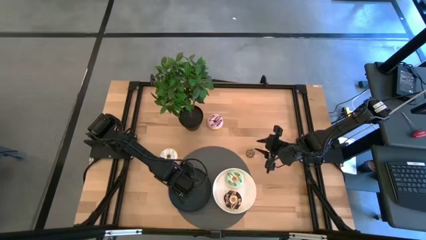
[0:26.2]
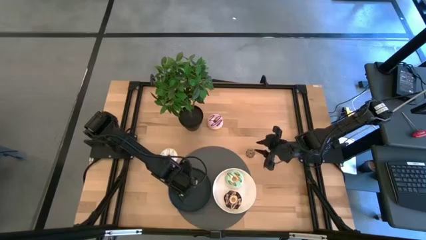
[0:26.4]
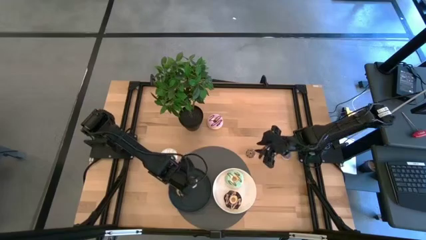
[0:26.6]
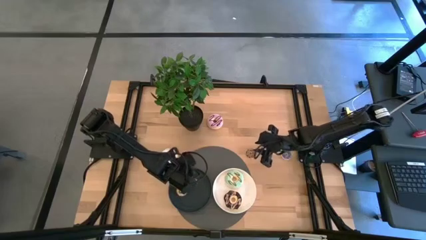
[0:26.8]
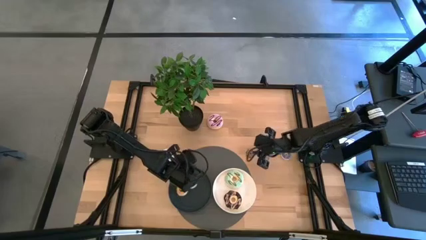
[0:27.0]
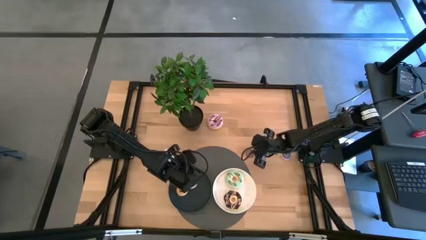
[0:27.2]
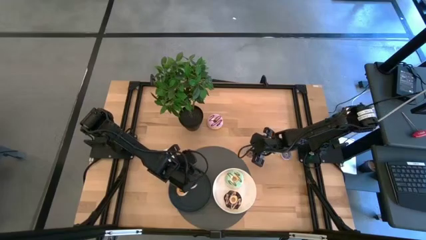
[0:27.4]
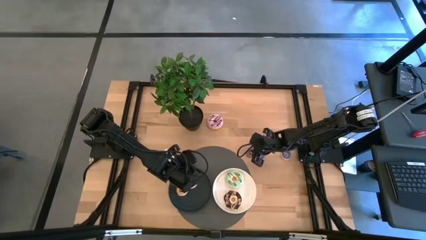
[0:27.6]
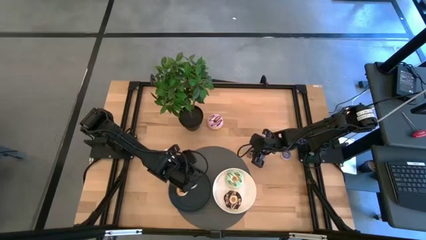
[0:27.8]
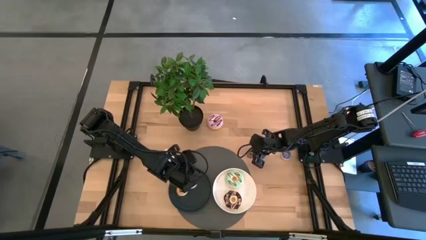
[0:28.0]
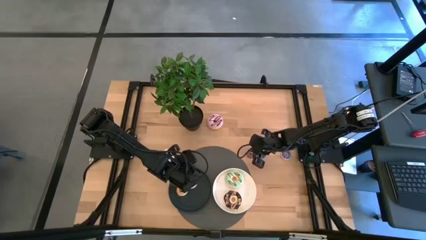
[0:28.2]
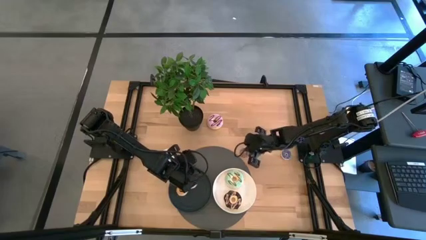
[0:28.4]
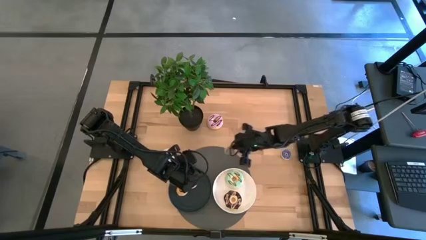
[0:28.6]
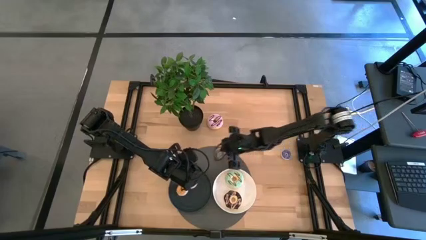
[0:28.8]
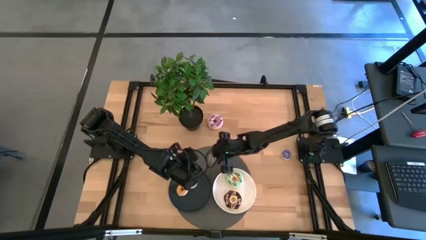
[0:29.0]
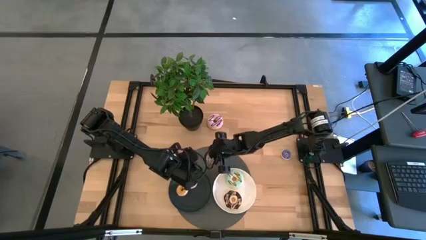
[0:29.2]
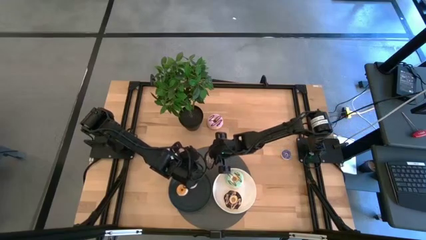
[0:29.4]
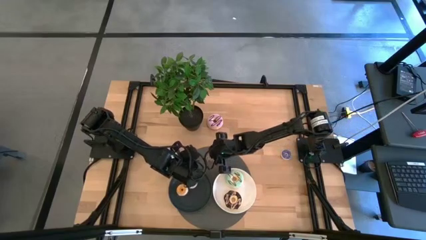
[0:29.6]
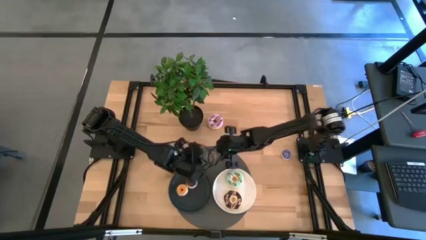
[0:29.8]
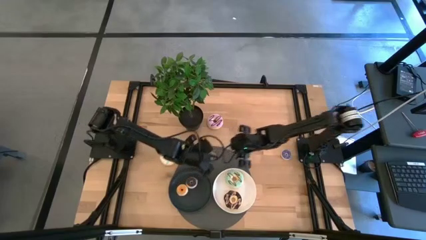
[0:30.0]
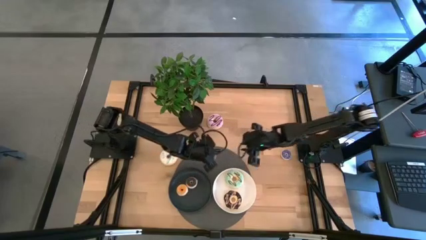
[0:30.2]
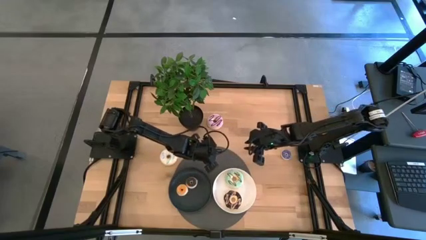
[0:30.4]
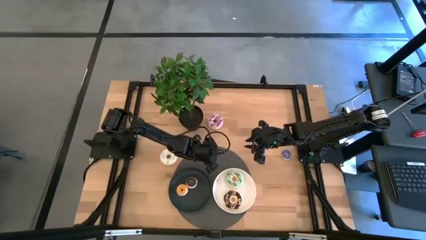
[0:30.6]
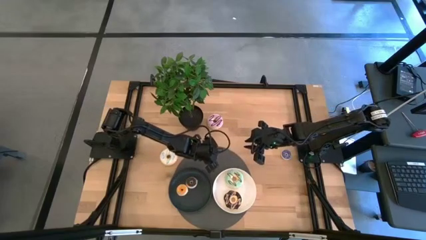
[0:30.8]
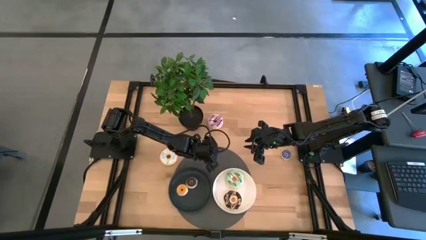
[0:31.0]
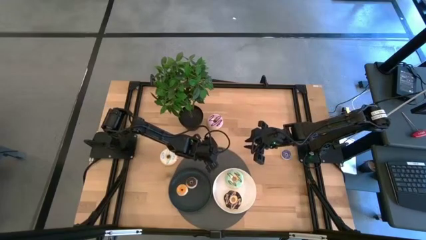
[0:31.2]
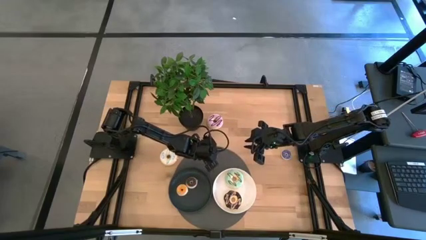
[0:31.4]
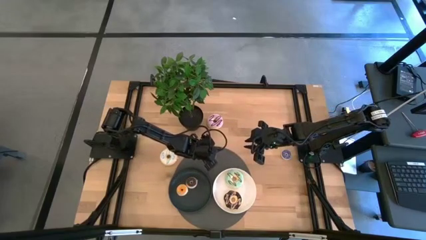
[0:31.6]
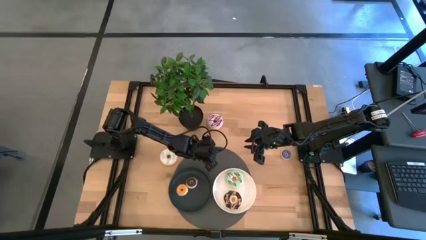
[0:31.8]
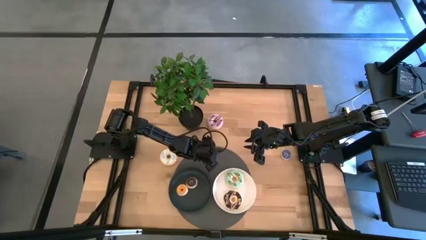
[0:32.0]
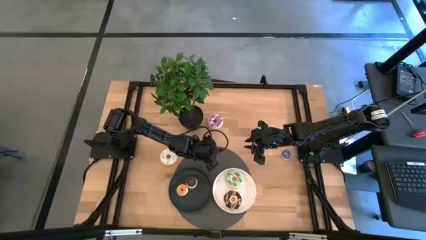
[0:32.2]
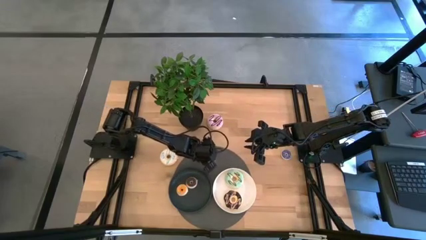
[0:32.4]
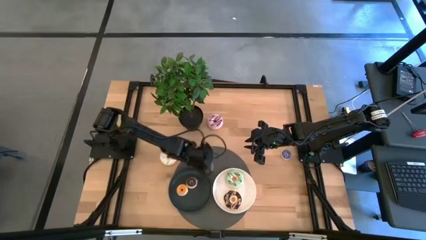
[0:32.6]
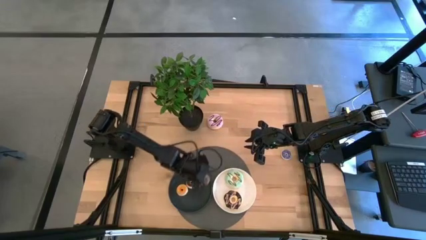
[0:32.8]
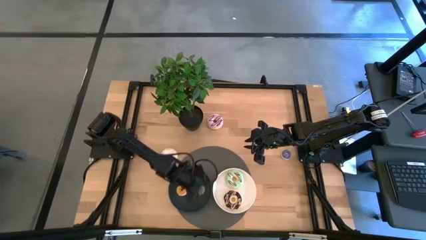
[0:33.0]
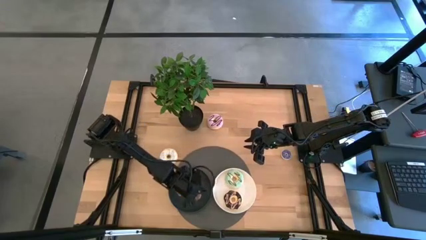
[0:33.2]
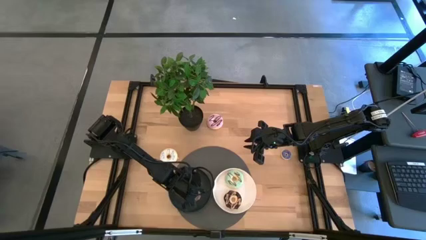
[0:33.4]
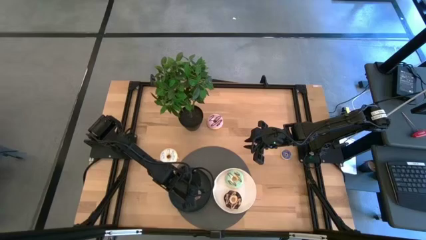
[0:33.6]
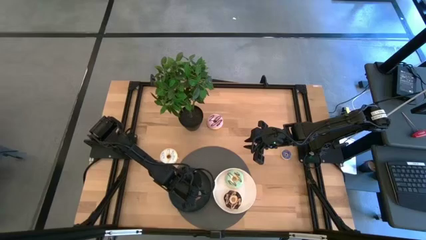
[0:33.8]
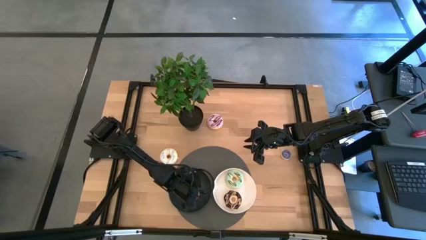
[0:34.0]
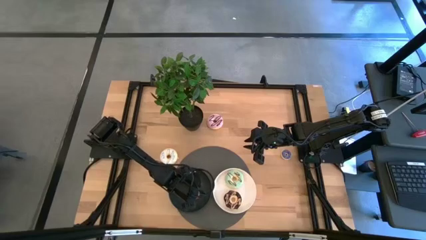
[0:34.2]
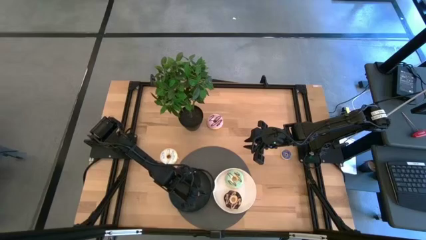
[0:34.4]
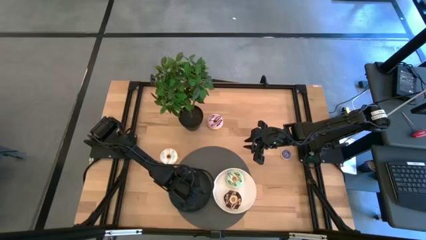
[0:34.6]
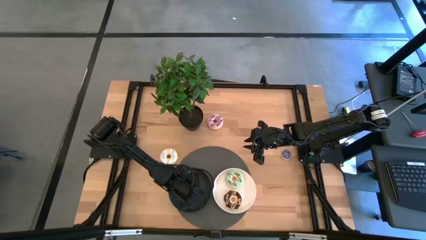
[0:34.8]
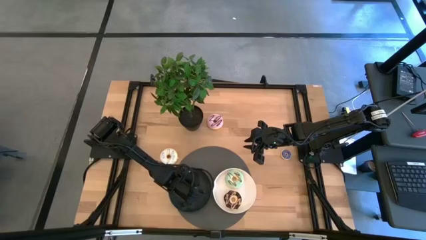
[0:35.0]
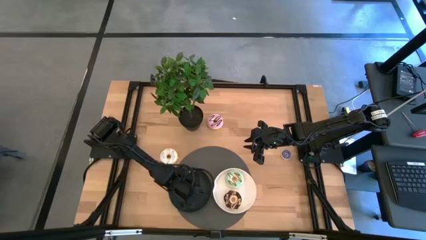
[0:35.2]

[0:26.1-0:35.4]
Task: Pick & Place donuts
Put the small brown sprinkled donut into the black plate

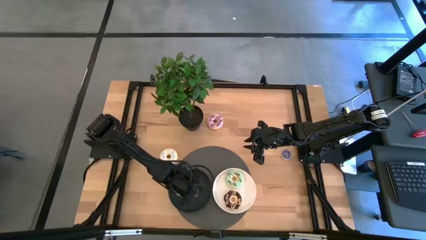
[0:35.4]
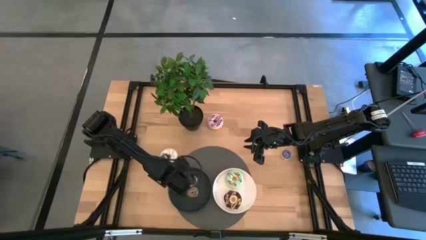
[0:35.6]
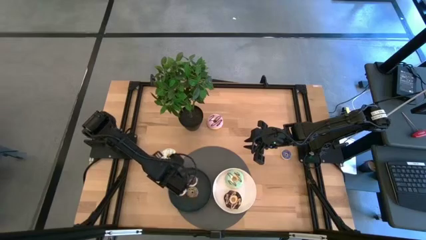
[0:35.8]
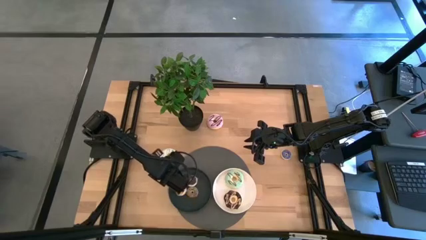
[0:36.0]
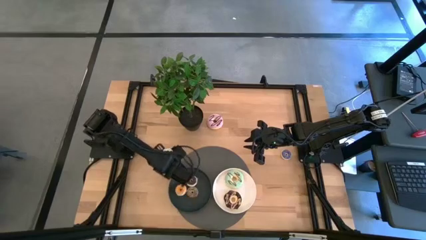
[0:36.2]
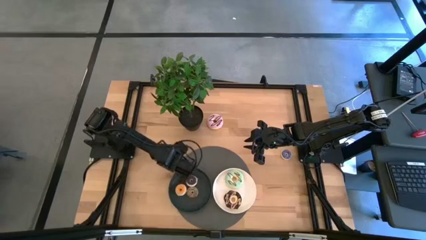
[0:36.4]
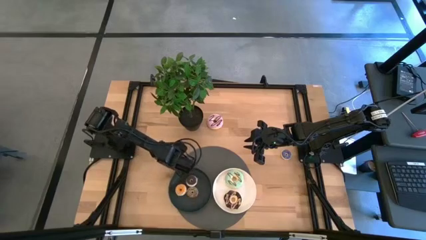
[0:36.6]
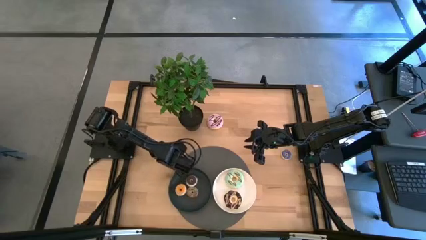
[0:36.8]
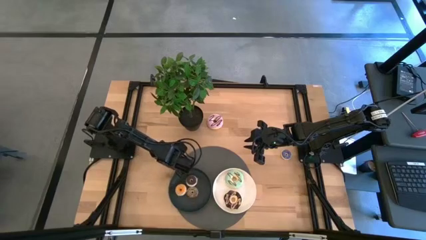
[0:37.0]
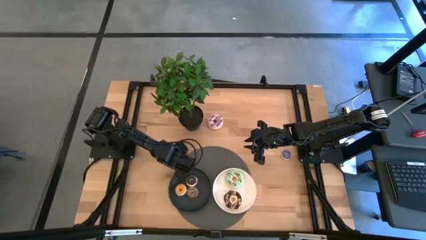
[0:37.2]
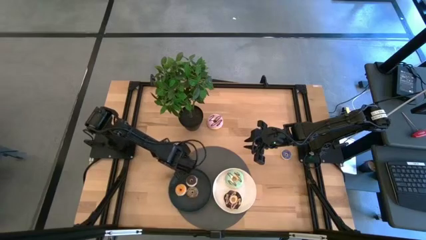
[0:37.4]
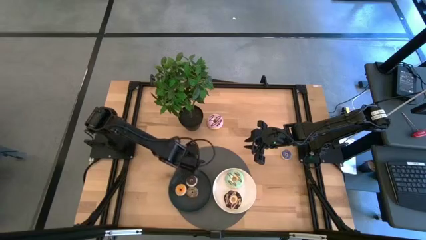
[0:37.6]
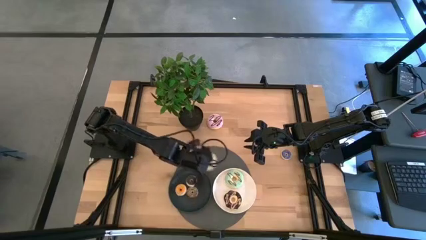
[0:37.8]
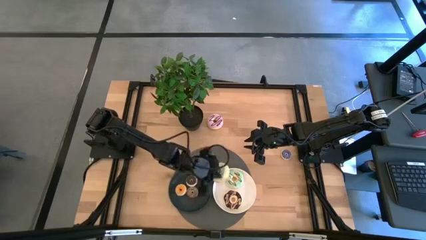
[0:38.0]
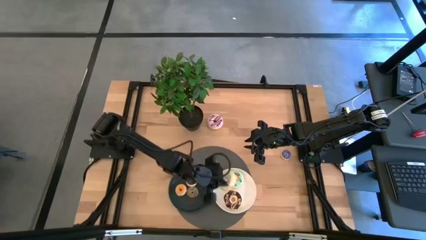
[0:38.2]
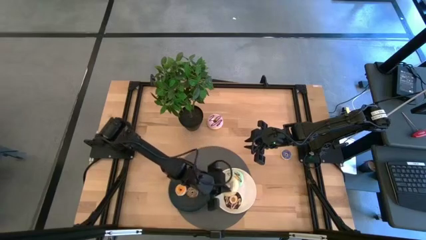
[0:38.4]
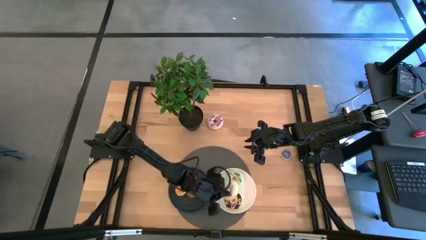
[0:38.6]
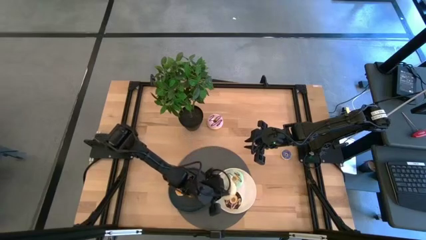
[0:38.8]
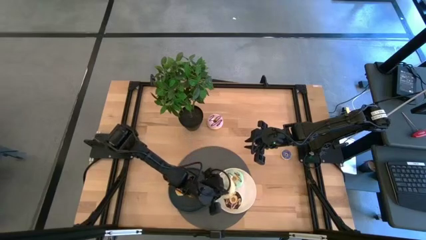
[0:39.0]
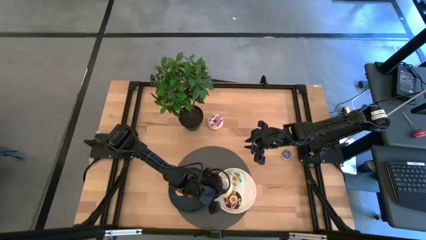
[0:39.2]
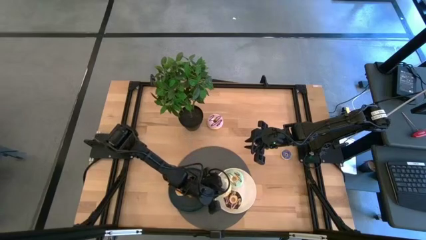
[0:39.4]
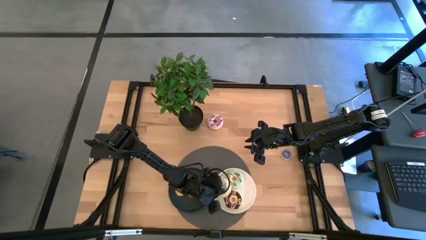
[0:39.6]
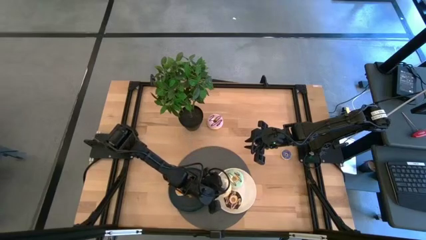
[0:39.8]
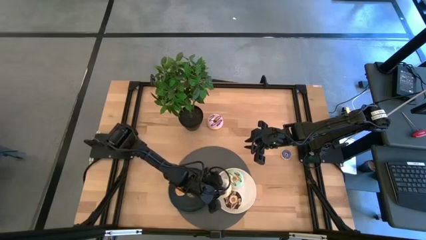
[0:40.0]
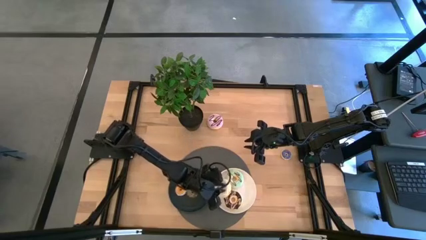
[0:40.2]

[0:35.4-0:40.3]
Put the big white donut into the white plate

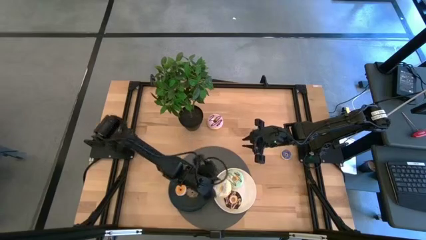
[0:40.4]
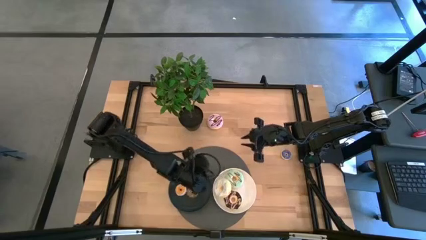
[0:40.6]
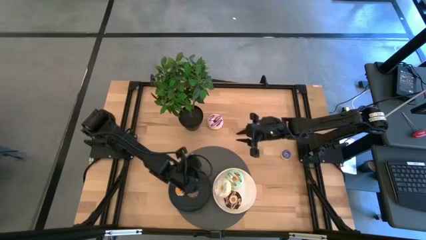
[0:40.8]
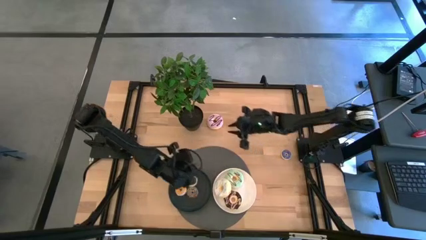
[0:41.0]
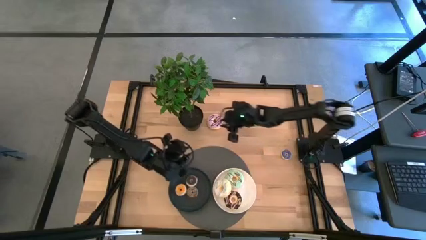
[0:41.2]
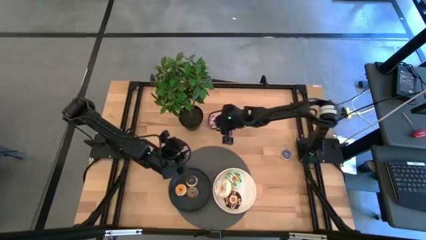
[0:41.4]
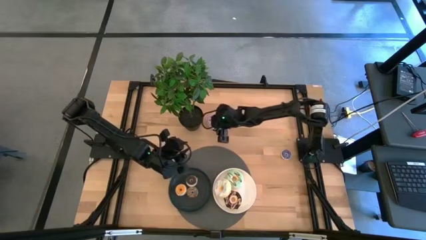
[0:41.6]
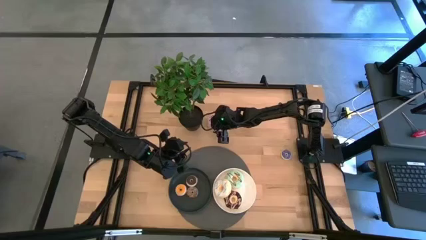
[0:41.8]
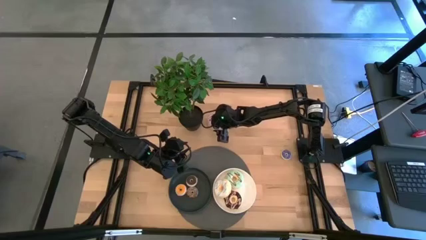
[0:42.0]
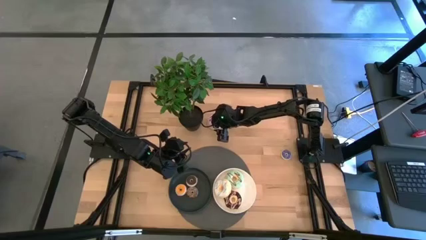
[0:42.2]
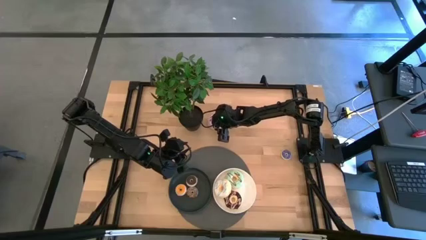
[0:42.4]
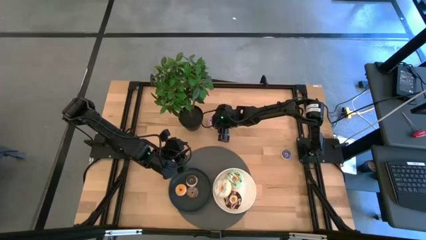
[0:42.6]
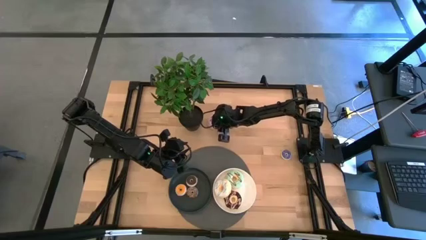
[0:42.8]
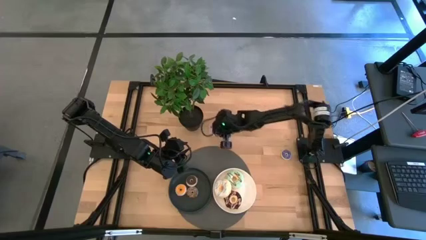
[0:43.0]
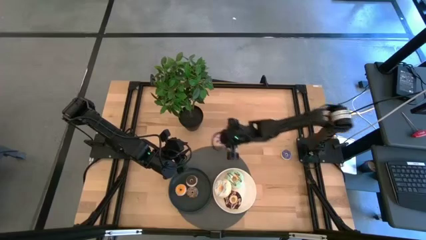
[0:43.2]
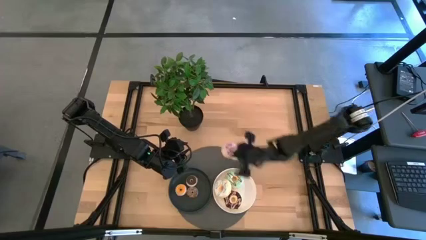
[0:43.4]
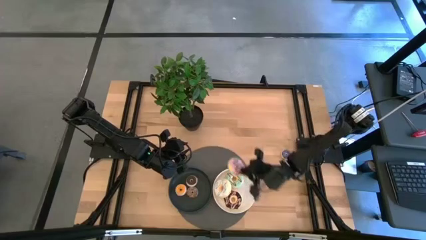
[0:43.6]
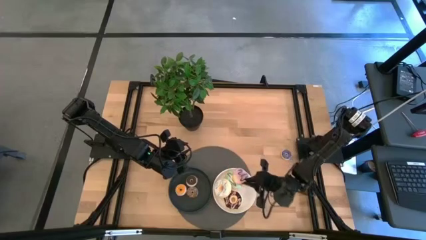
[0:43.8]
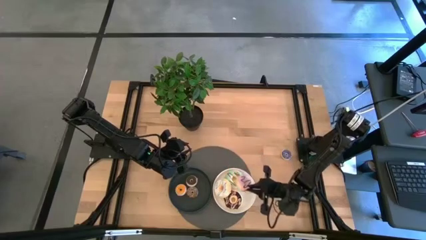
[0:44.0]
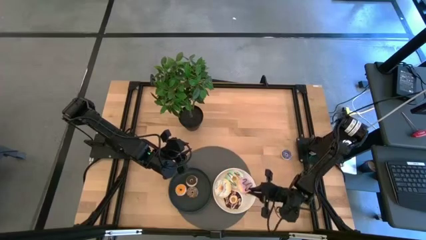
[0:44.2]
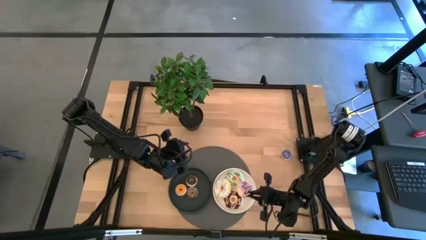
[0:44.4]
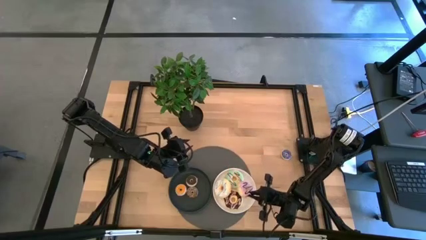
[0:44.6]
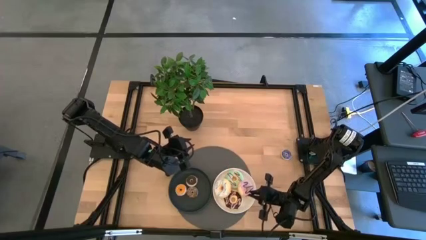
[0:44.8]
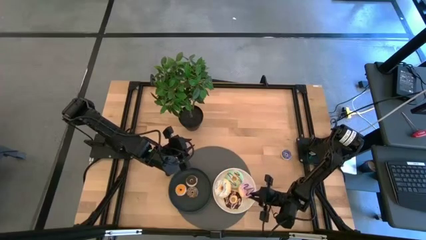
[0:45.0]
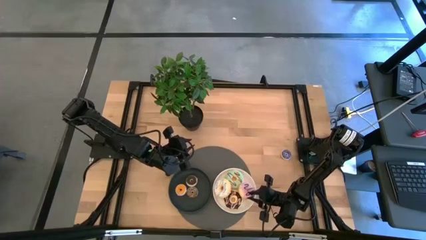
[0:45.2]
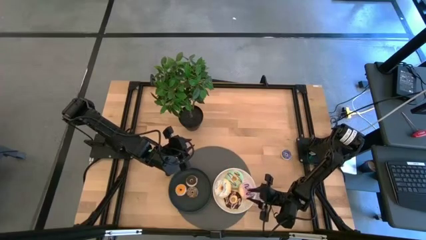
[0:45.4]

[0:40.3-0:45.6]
Put the big pink donut into the white plate
